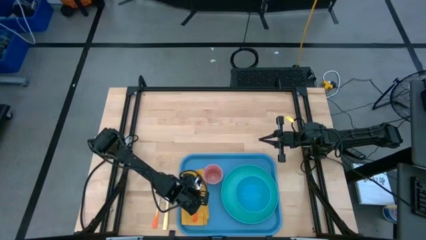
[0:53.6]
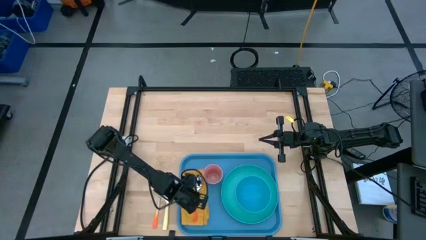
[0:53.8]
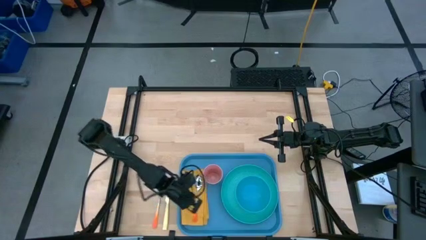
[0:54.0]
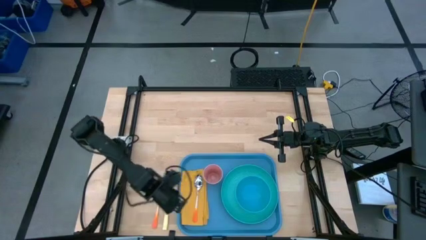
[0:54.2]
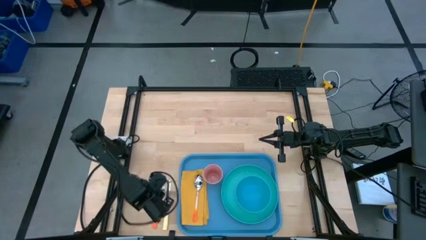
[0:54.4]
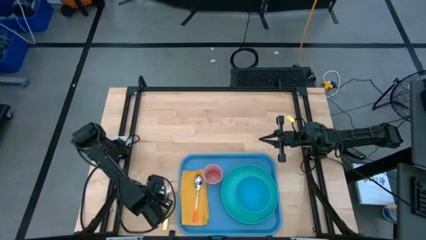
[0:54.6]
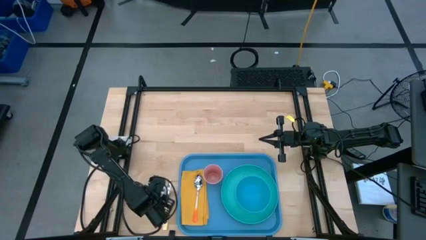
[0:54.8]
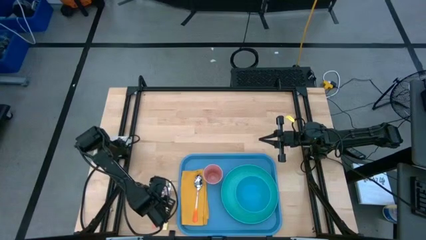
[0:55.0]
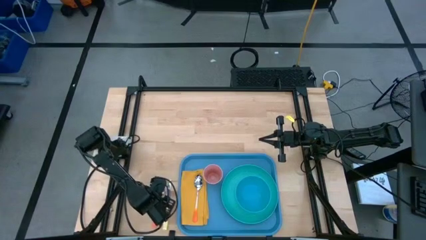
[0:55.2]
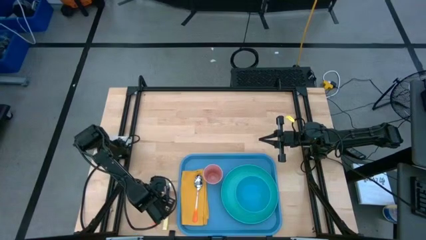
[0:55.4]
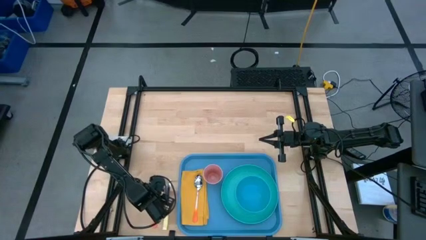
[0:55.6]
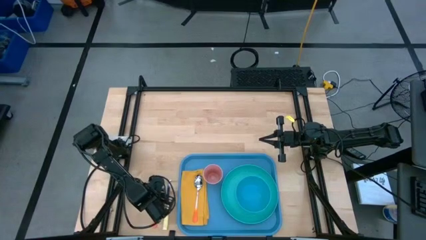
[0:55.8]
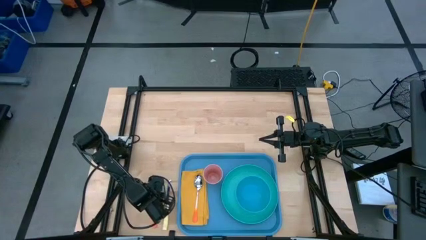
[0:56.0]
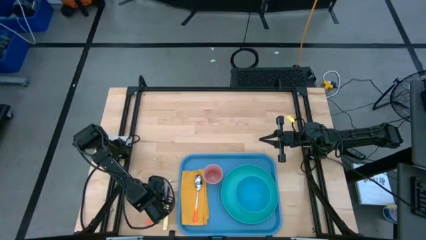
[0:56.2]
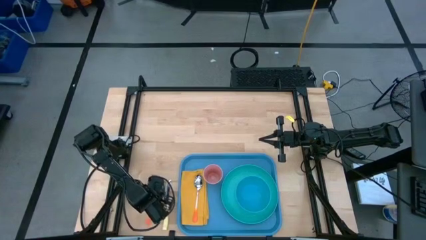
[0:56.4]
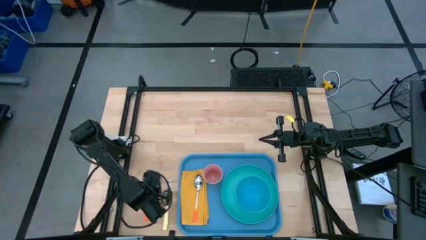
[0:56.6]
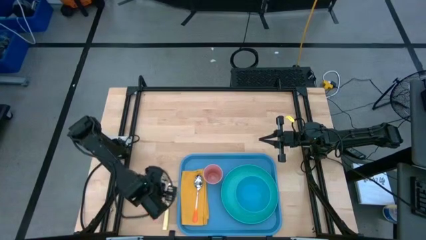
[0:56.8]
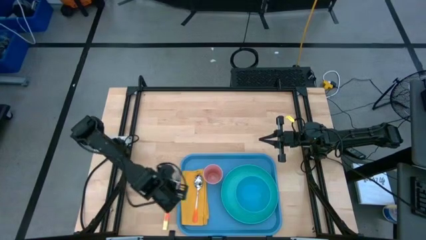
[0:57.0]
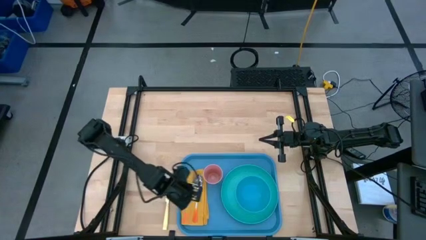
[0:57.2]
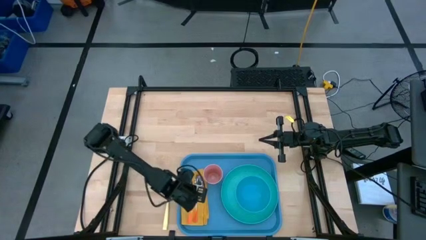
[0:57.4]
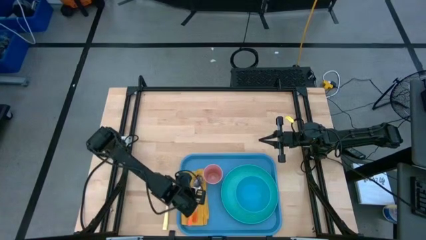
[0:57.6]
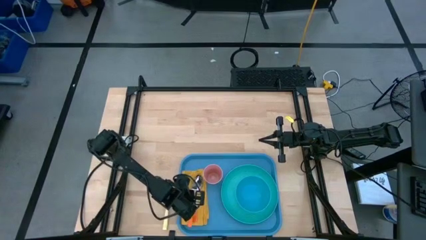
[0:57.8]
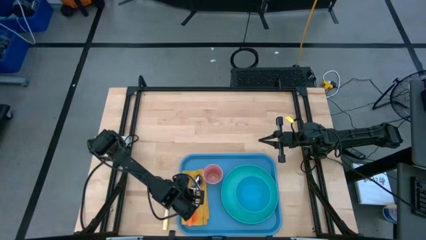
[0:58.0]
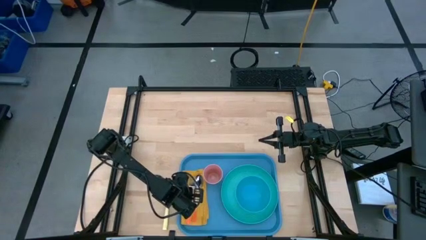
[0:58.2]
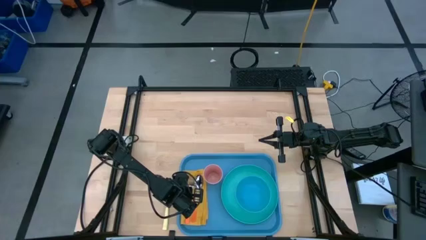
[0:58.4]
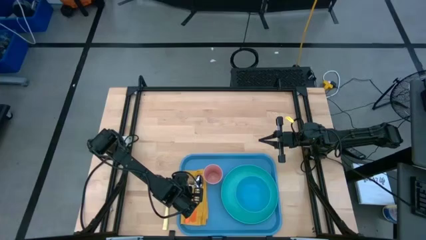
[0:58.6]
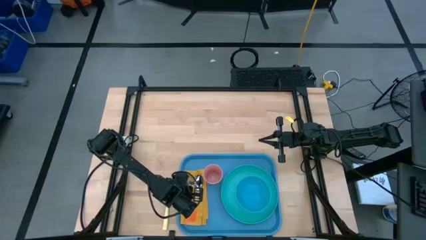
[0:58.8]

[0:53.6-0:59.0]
Task: Set up tray
Put the orange fork on top of the yellow napkin to the left of the orange spoon

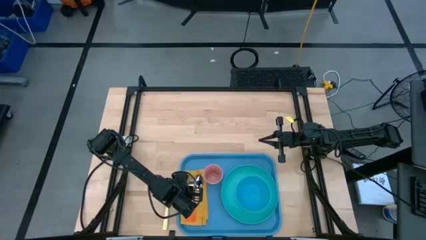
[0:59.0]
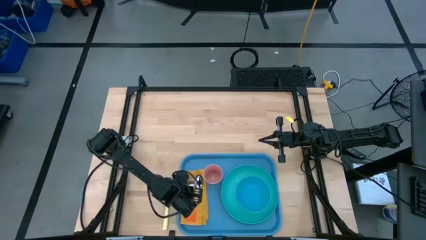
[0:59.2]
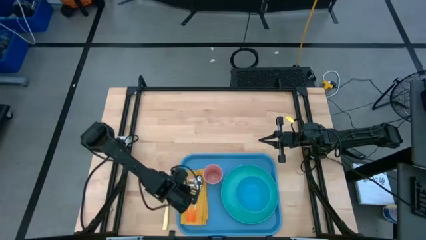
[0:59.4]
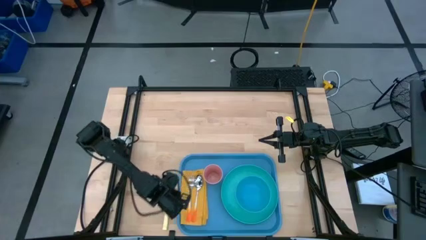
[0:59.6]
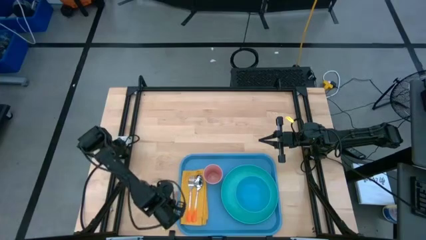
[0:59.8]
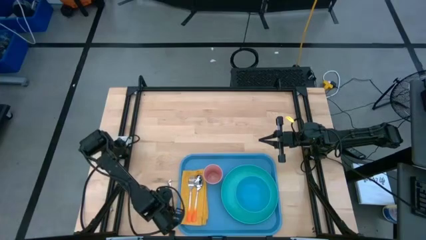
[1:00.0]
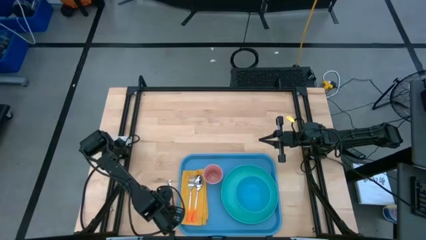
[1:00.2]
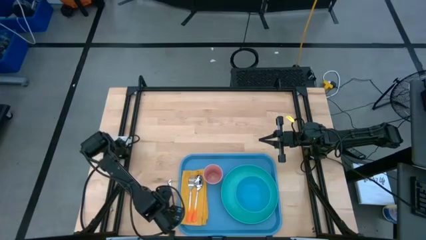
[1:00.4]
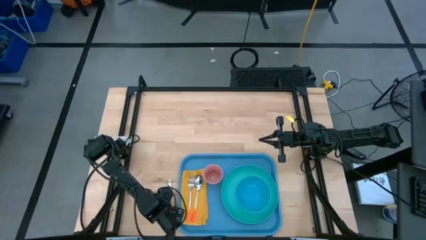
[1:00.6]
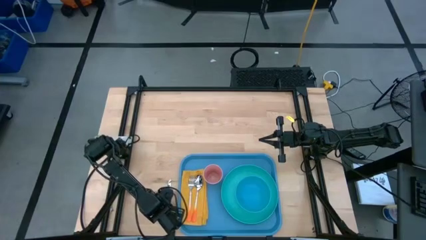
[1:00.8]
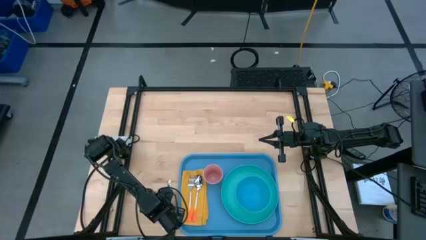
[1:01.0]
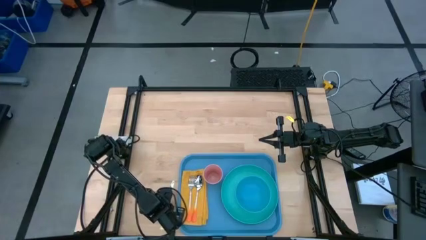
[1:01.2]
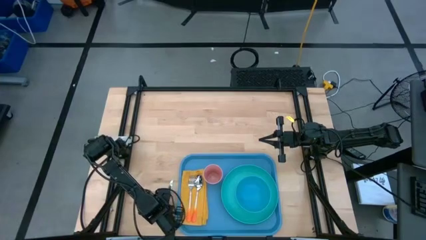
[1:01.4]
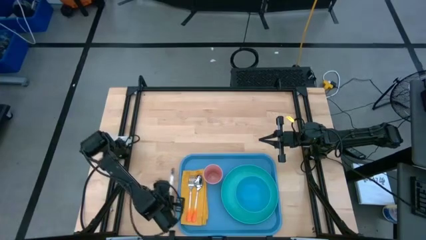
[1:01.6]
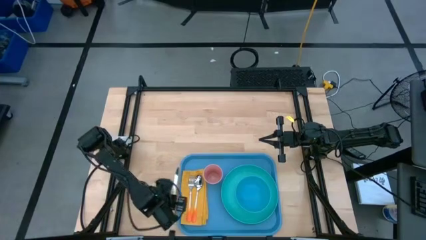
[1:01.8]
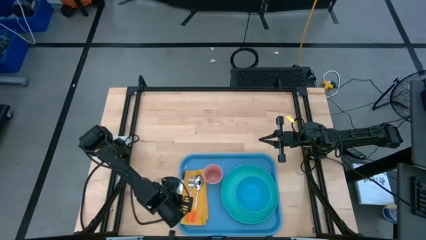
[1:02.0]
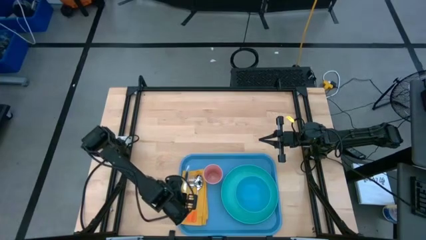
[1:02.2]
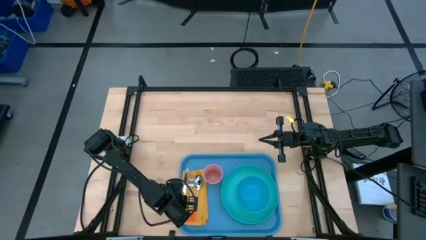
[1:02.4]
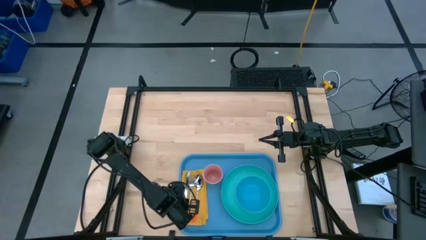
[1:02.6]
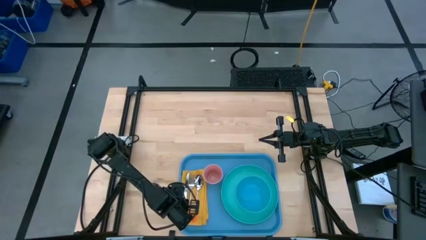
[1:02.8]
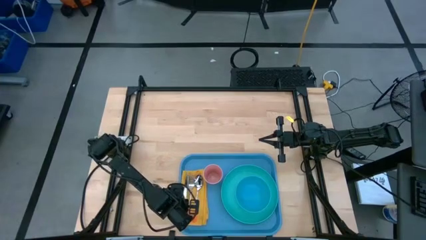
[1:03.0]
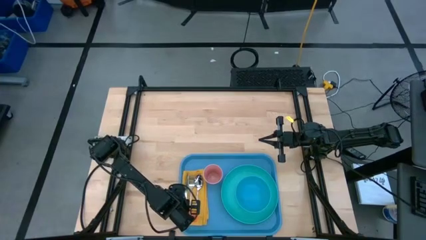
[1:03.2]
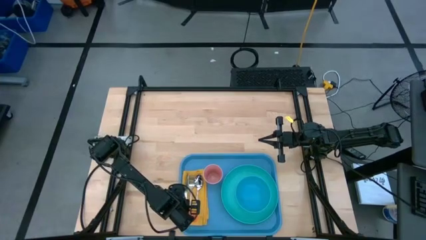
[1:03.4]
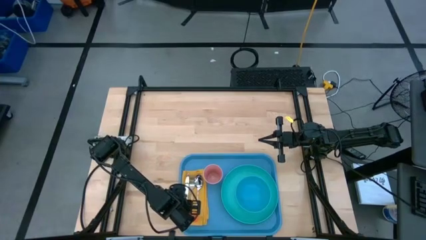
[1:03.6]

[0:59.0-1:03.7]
Put the yellow knife on top of the yellow napkin to the left of the orange fork

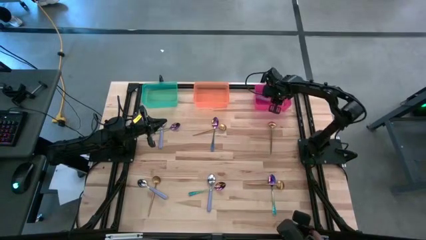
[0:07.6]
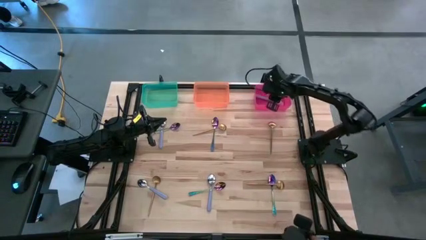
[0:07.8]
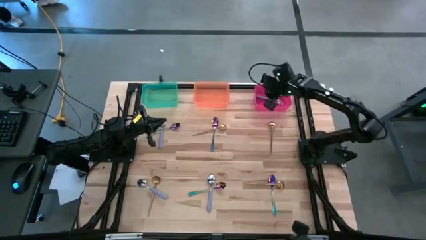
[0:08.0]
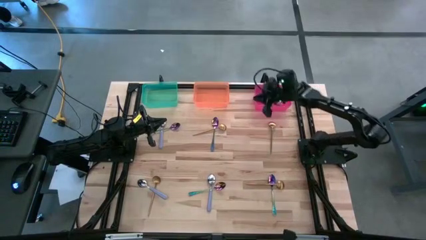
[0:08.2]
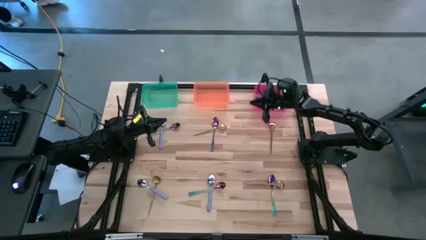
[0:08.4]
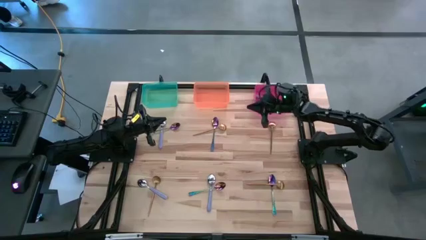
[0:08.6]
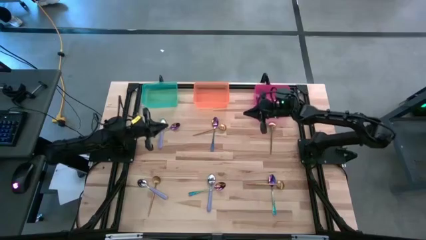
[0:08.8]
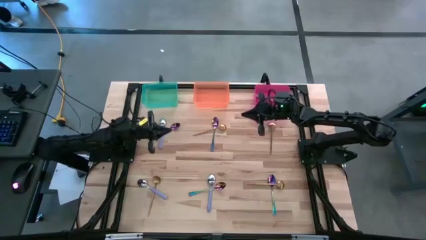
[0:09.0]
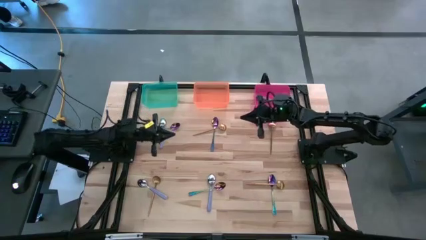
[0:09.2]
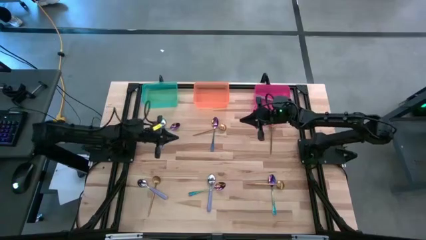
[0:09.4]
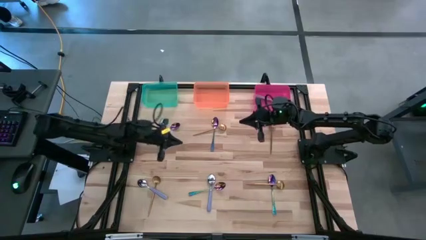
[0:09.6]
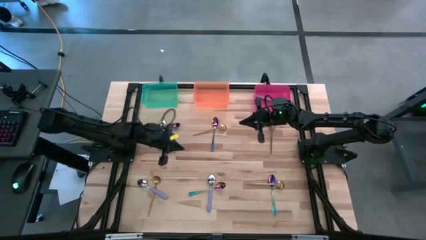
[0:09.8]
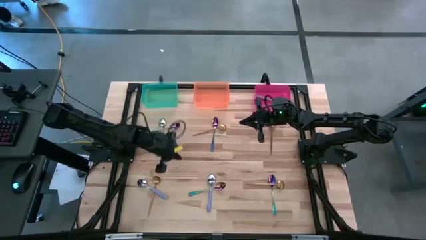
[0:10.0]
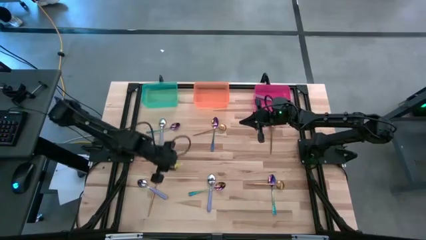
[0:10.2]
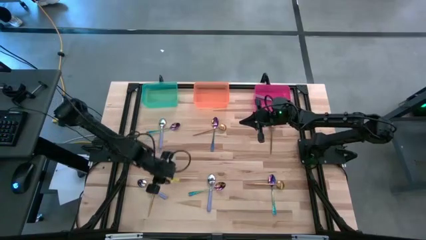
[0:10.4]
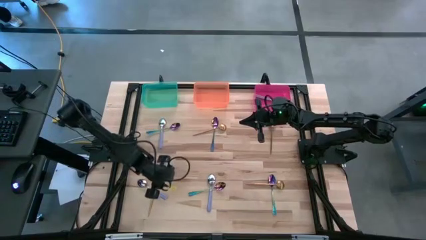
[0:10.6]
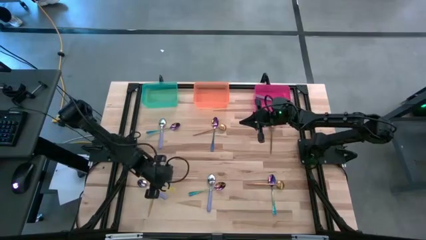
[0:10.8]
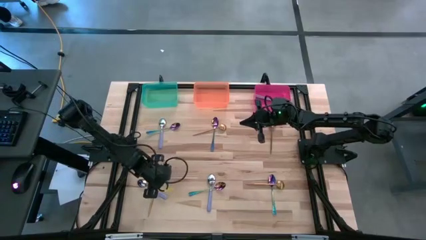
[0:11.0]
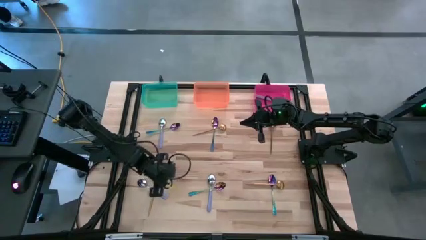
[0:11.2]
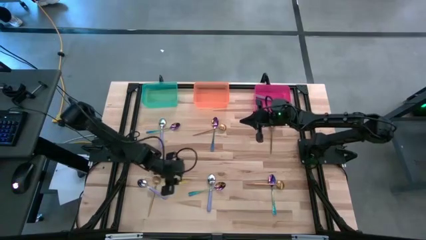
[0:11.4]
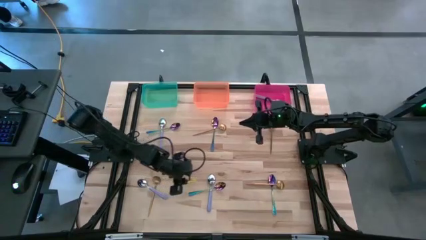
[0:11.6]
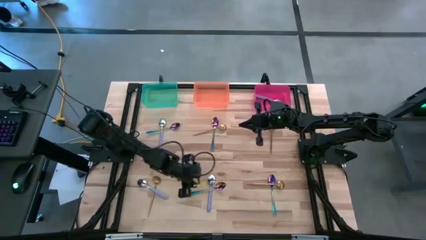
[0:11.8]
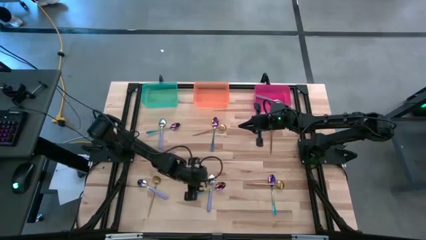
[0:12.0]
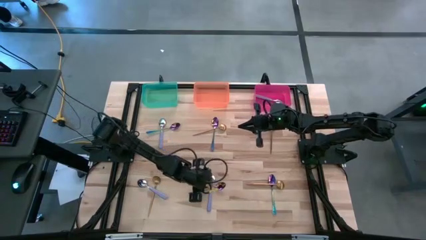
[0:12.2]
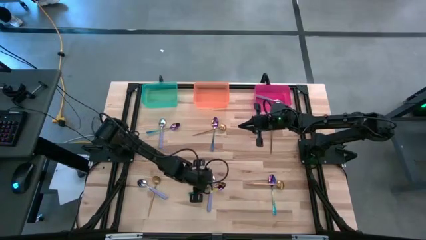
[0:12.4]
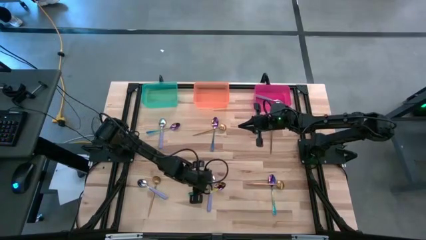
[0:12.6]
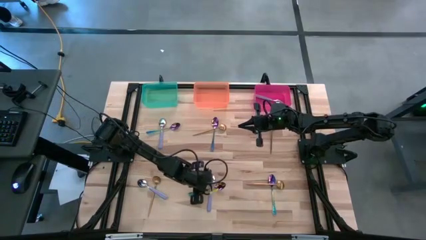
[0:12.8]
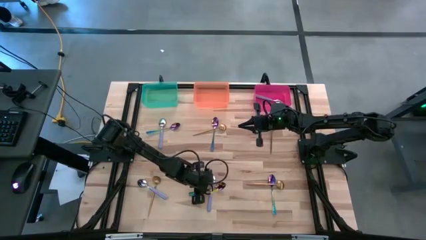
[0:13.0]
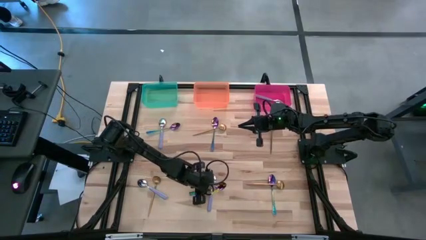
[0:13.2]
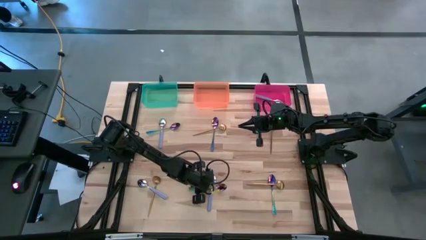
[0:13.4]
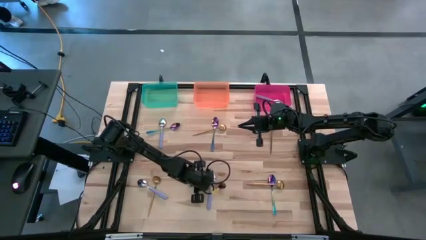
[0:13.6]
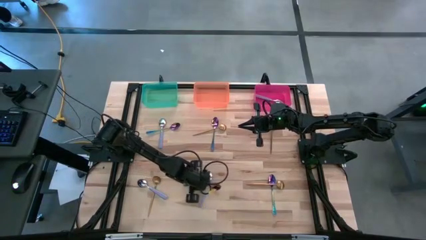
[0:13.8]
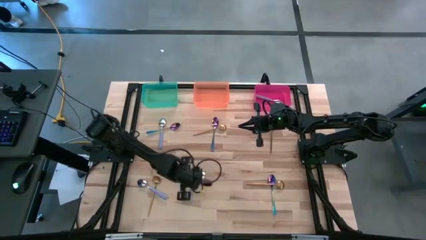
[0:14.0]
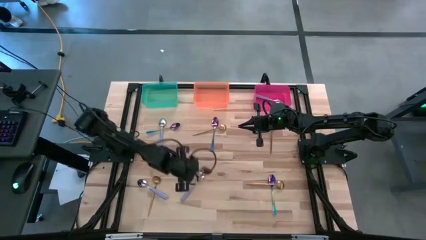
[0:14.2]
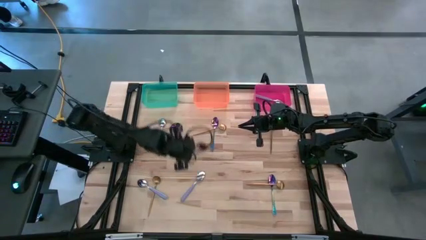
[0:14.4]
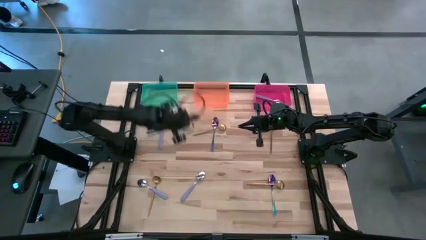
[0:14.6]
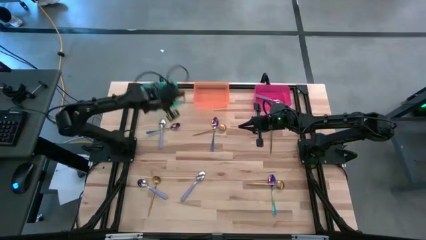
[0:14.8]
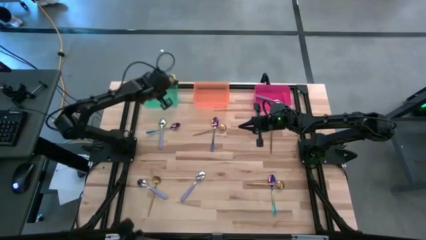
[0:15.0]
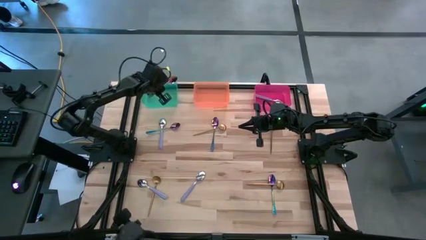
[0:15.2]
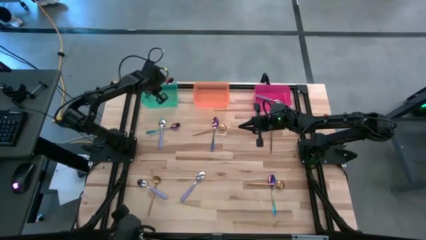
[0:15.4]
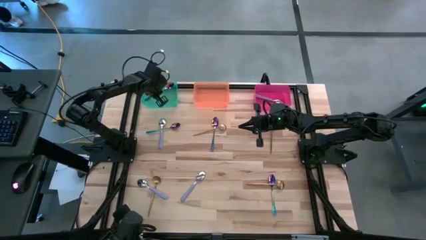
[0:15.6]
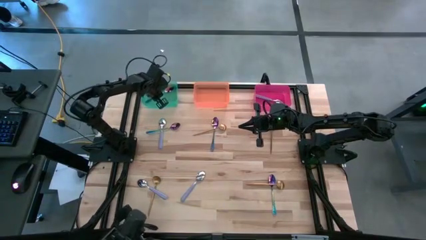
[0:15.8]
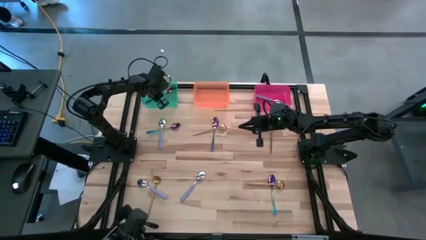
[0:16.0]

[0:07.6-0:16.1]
Task: Sort silverware by color (type)
Put the blue spoon into the green bin
